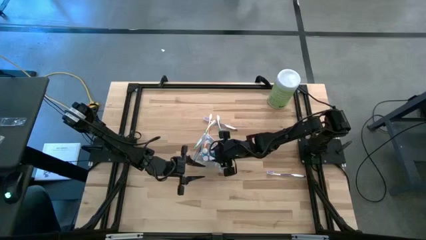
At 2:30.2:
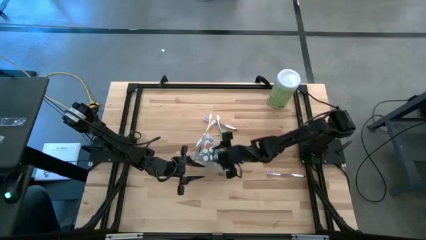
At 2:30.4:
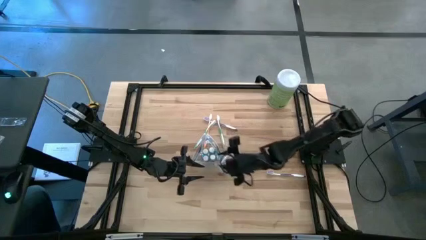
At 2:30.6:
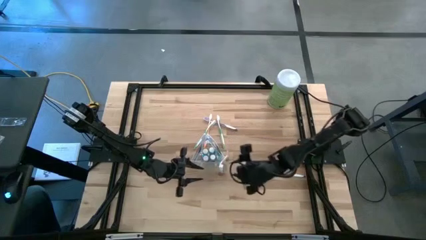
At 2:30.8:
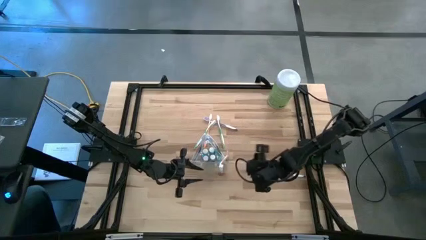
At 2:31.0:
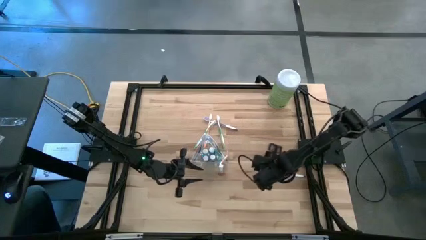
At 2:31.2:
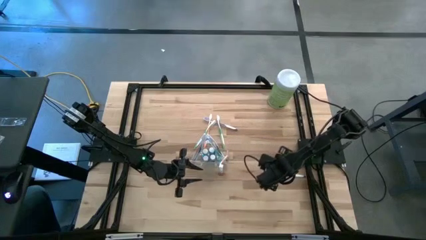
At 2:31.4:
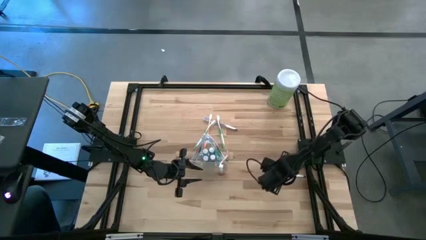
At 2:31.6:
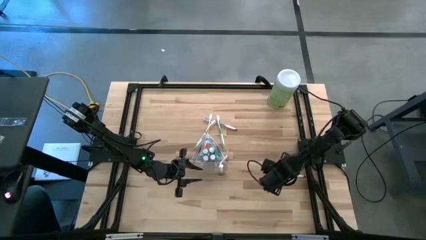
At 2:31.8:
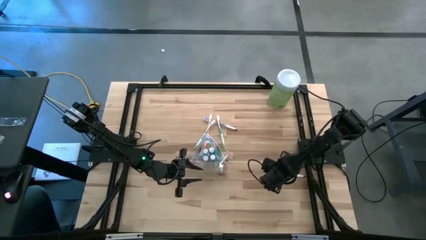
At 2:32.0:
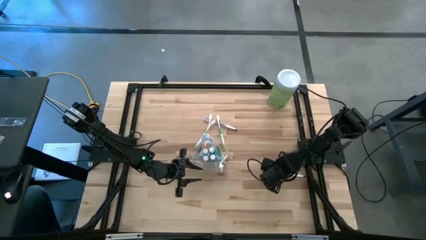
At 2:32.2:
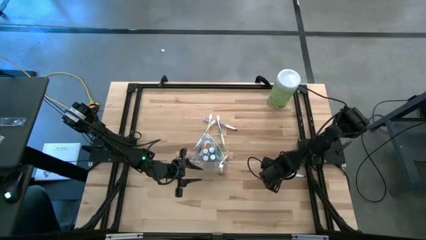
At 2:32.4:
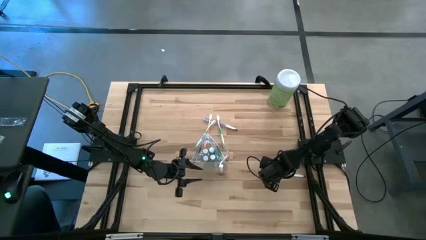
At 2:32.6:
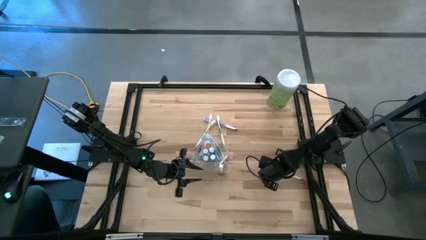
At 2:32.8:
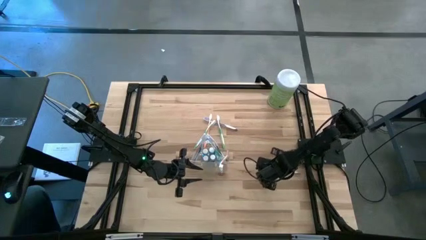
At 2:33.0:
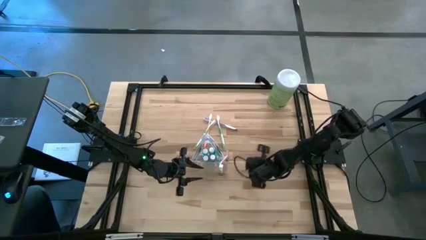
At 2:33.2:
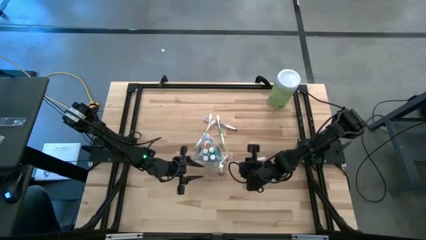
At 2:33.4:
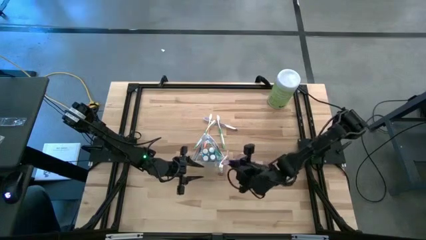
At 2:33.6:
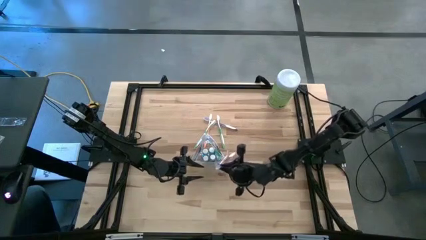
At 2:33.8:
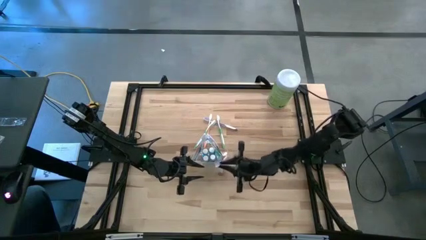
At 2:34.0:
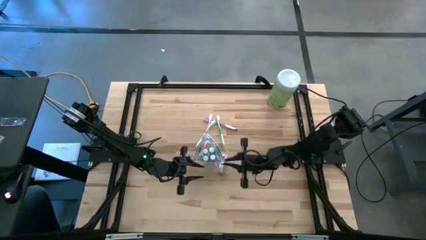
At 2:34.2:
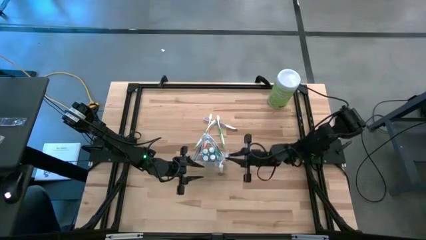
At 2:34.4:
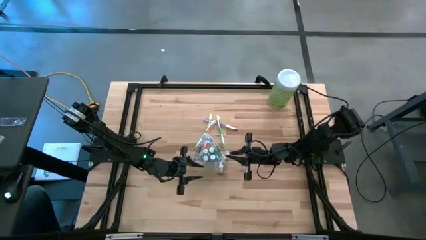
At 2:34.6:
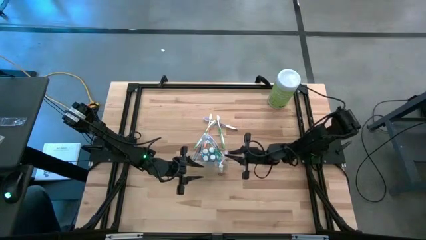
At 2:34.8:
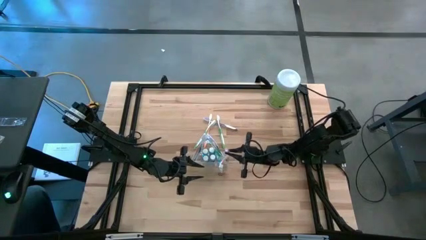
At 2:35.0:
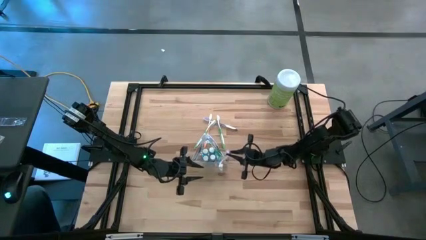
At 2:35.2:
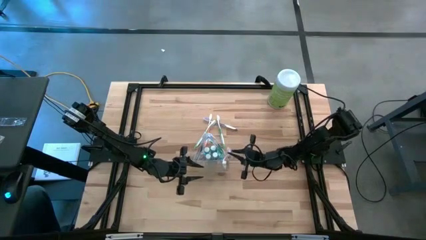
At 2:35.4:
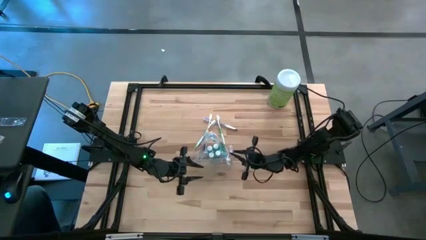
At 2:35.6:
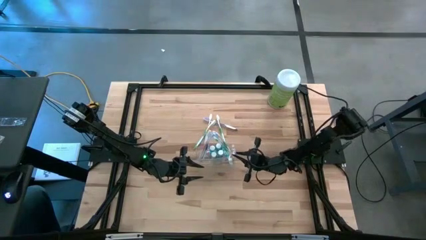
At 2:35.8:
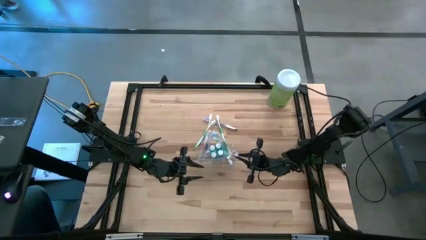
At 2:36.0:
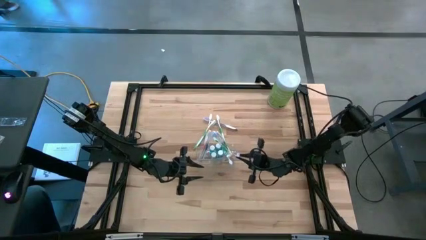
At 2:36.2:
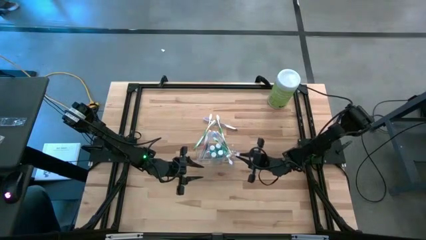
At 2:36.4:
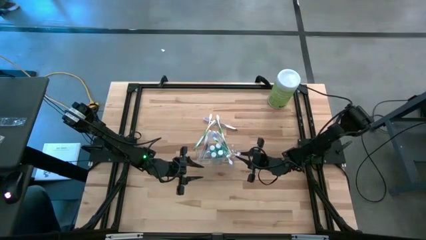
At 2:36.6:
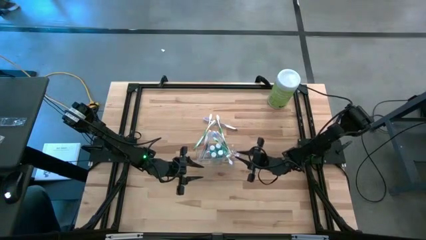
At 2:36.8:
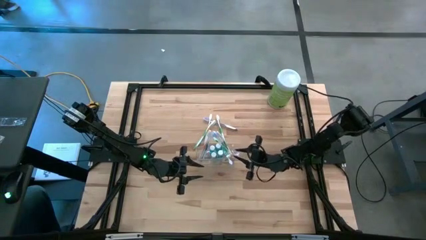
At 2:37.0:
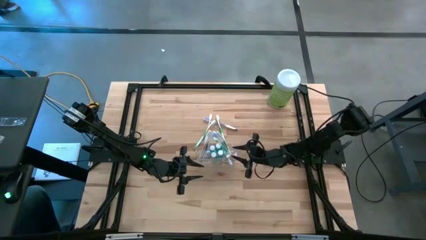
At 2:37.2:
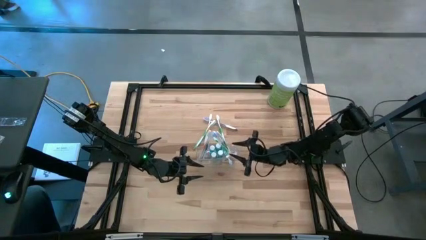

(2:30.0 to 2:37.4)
Task: Pick & Place toothbrushing station
Put the purple toothbrush into the right side of the transparent organizer

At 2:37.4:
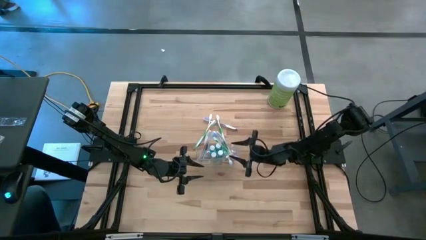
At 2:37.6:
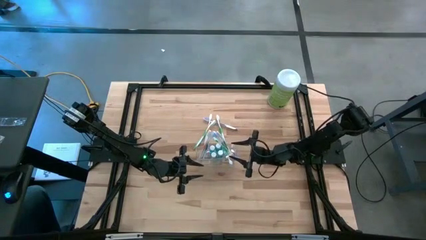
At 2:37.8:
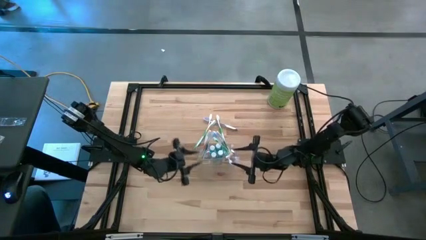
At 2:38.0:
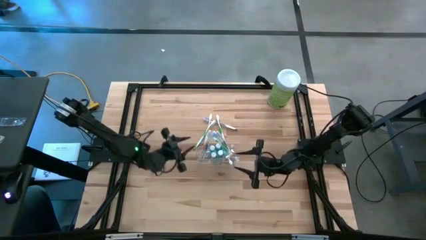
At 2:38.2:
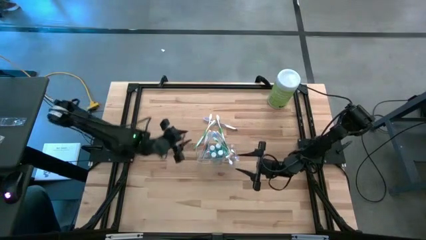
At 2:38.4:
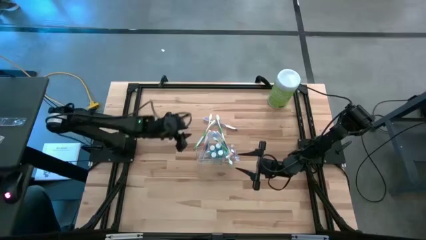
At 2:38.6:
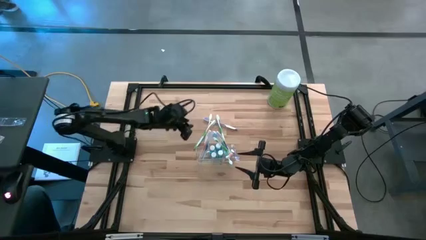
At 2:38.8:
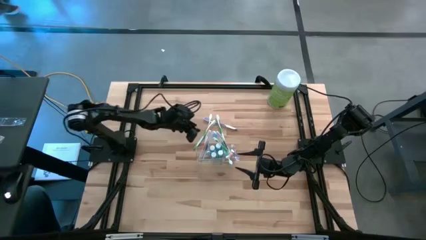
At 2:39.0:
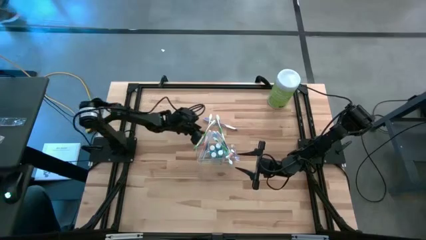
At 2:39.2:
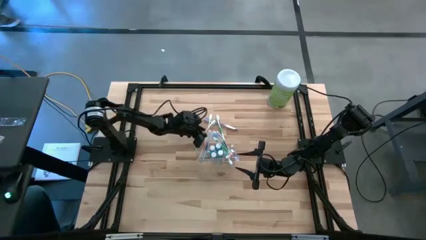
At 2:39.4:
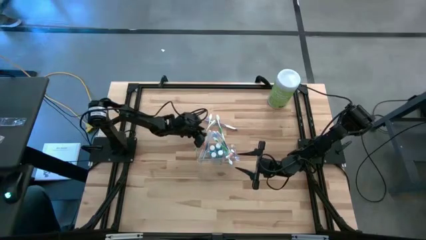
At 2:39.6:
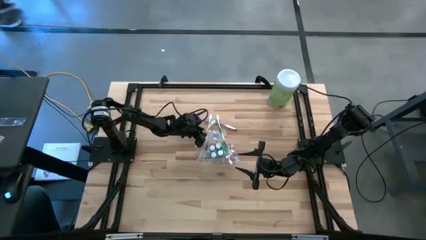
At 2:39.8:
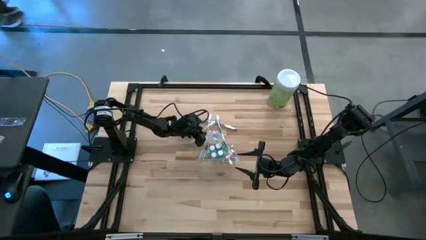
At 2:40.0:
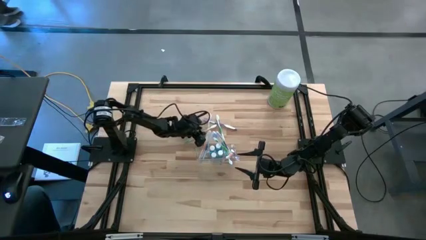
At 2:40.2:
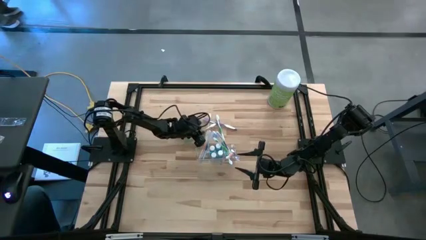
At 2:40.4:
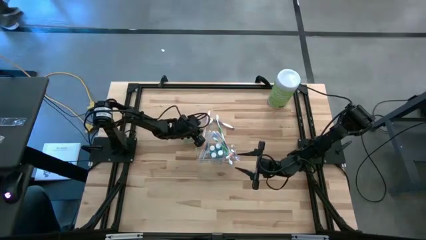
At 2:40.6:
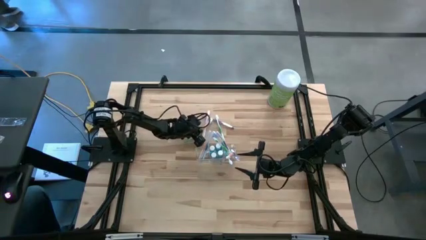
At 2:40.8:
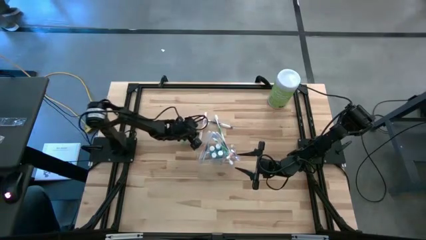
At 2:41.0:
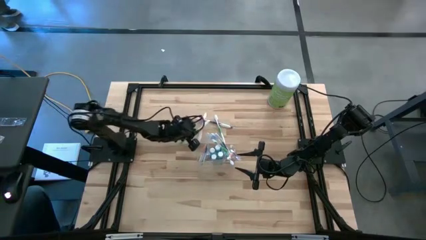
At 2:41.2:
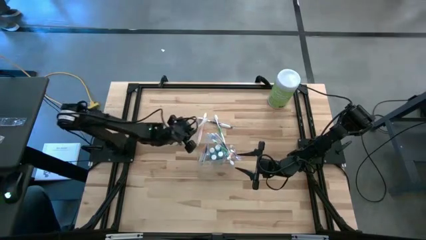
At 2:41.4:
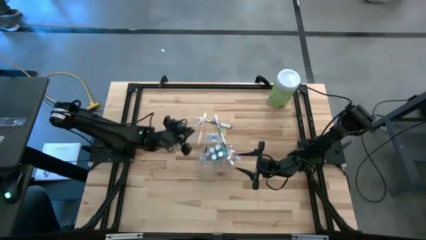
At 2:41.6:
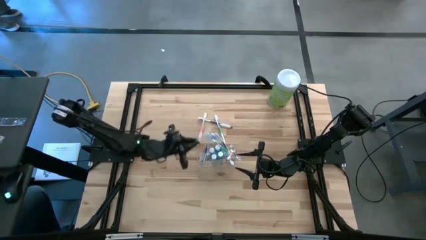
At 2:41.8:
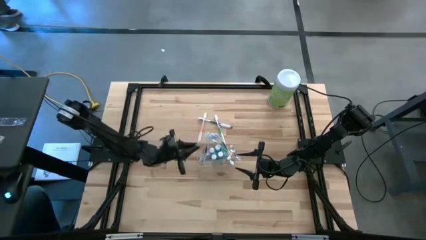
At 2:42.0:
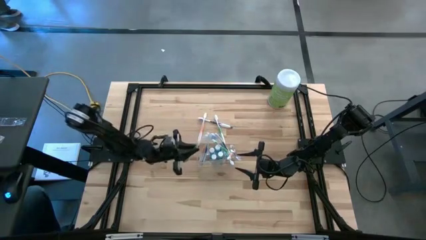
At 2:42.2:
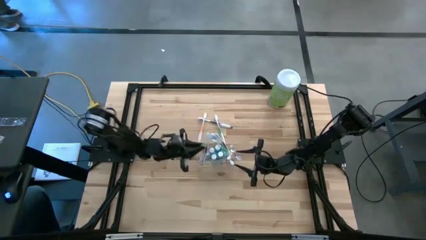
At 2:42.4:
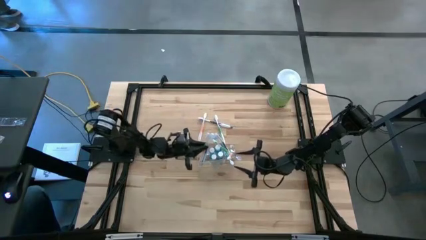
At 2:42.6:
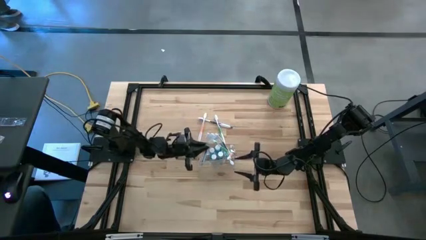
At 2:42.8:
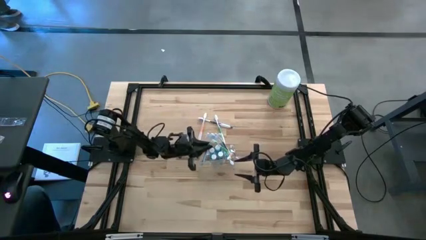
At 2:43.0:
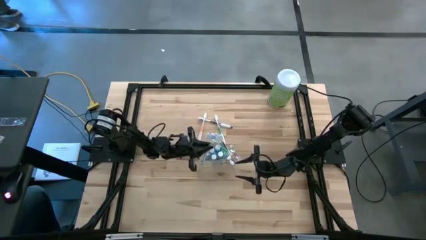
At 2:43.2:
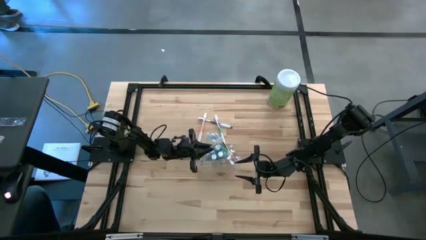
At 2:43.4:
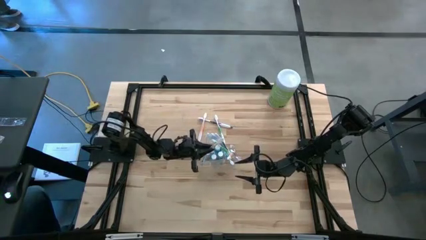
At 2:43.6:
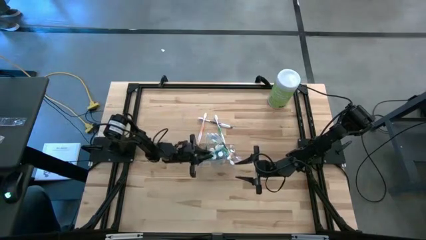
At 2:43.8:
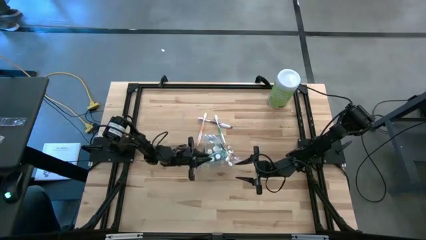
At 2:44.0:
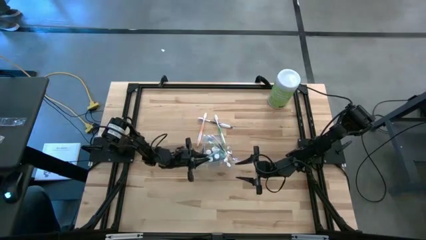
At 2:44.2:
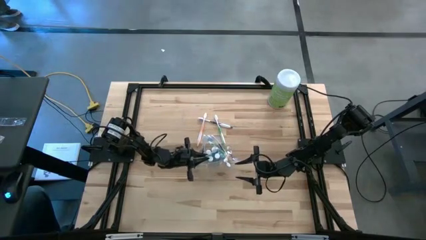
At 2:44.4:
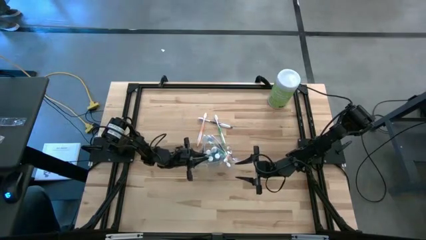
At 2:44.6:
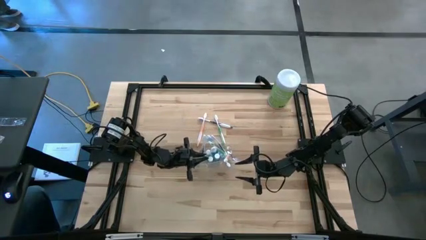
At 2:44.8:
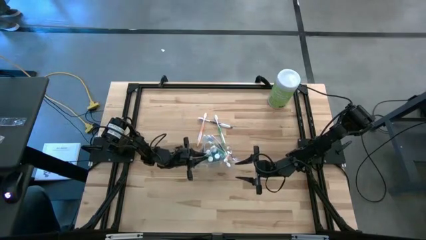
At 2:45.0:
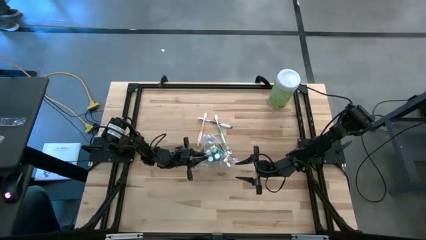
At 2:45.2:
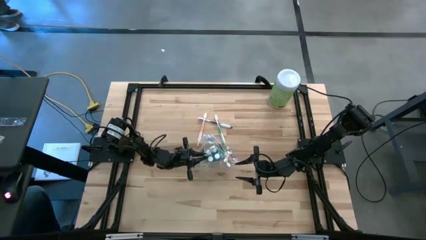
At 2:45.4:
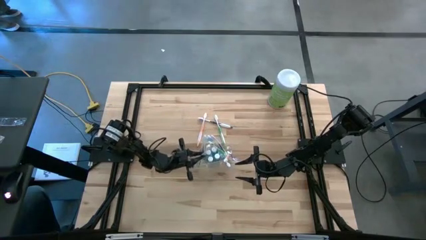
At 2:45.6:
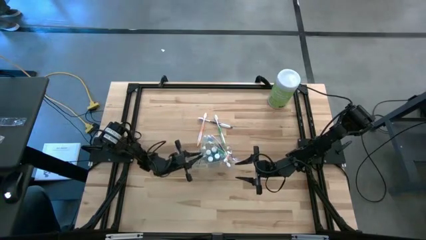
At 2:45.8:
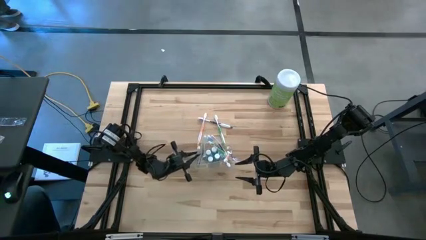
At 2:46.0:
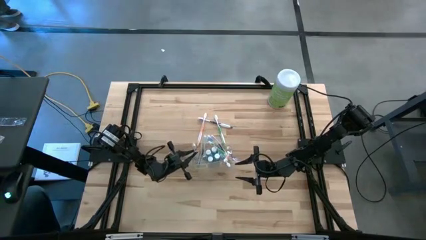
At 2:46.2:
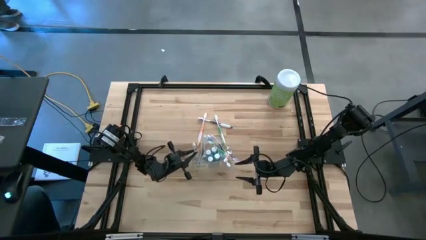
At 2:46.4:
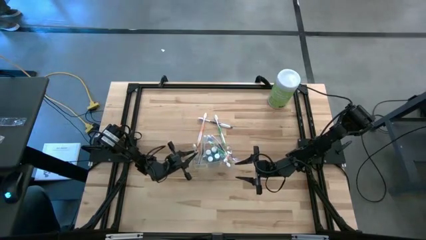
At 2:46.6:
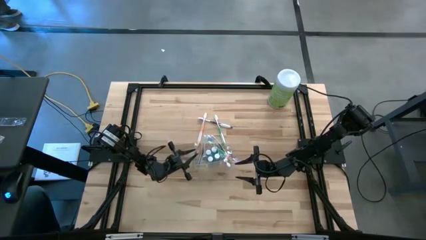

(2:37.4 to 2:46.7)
Put the green toothbrush into the left side of the transparent organizer
